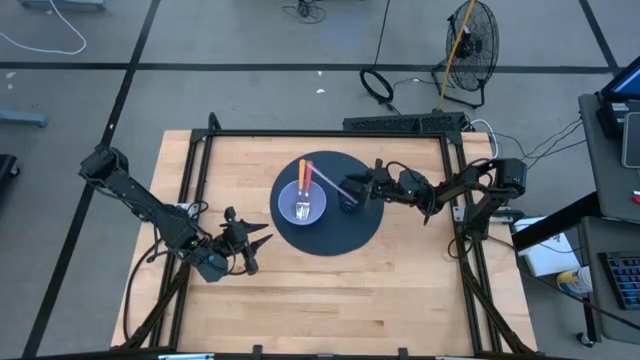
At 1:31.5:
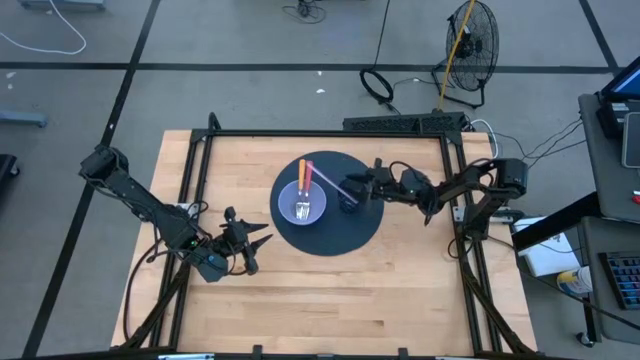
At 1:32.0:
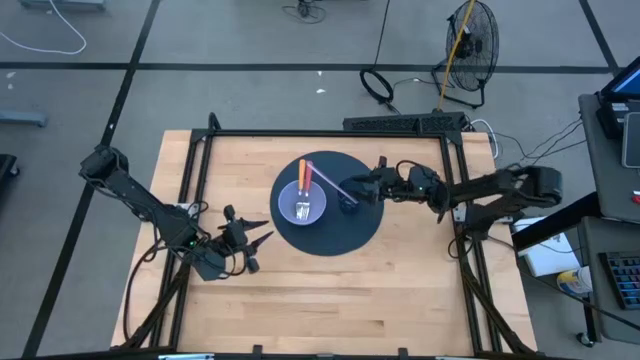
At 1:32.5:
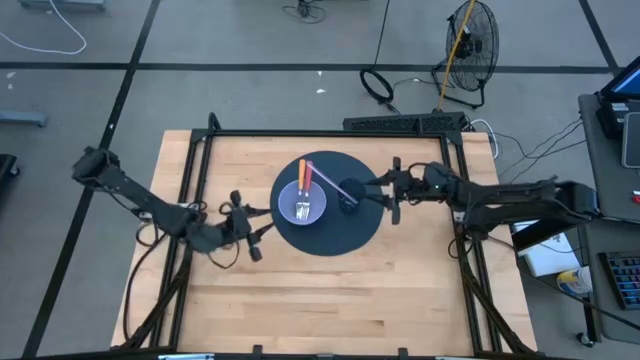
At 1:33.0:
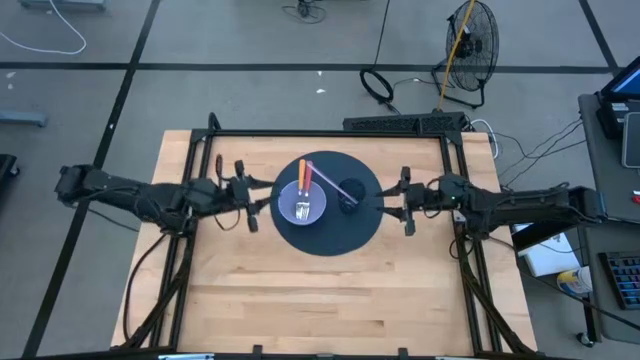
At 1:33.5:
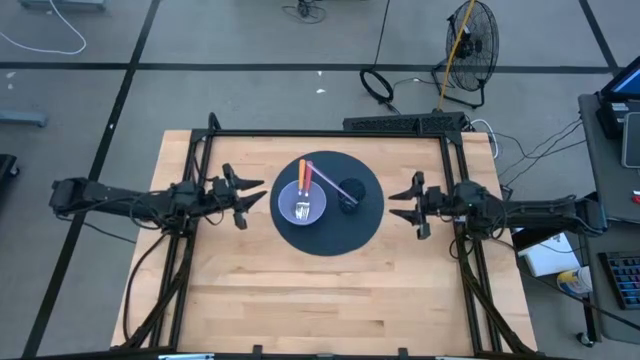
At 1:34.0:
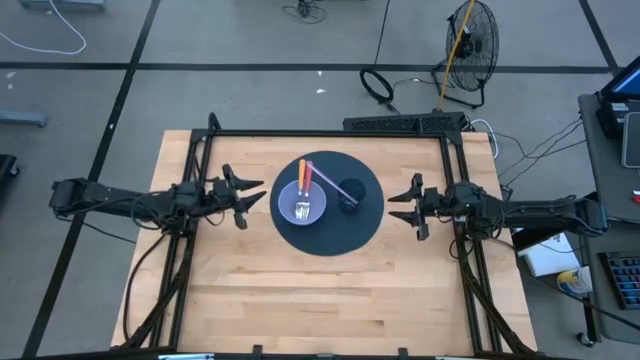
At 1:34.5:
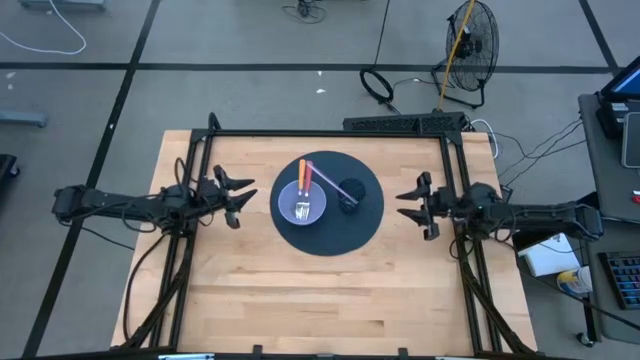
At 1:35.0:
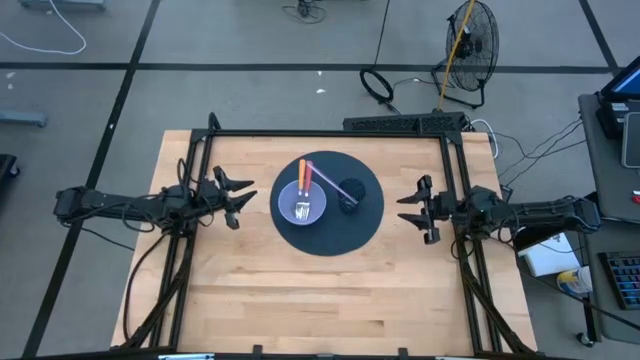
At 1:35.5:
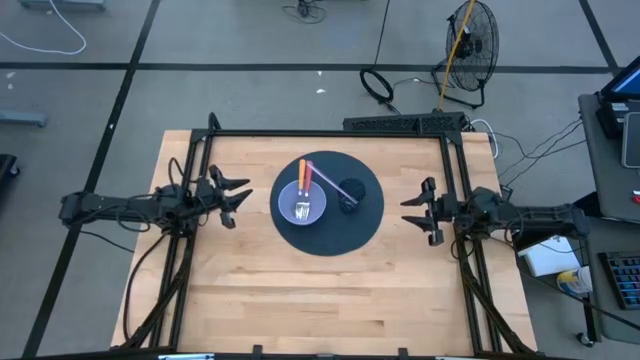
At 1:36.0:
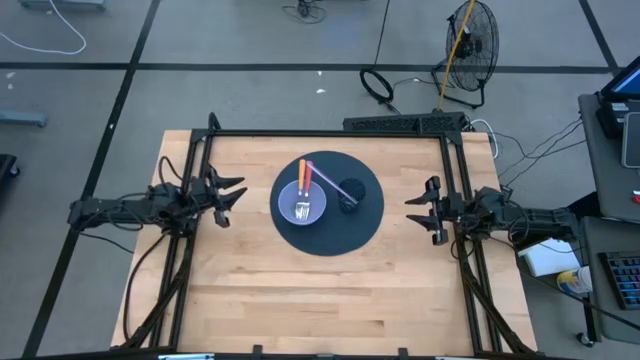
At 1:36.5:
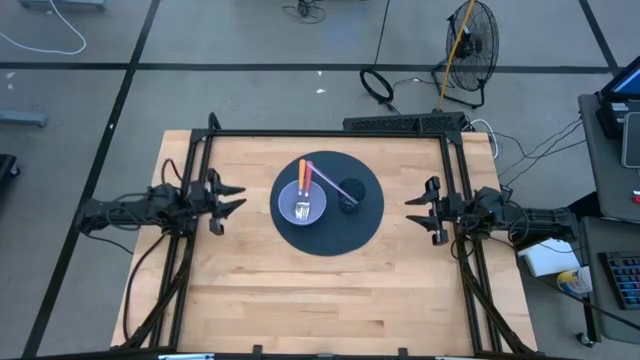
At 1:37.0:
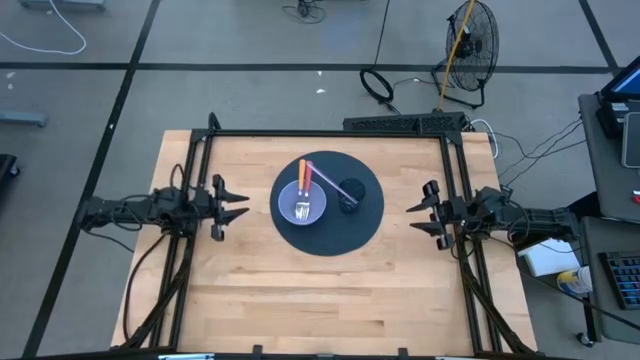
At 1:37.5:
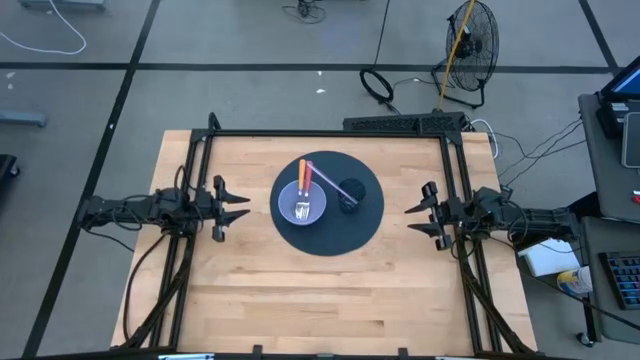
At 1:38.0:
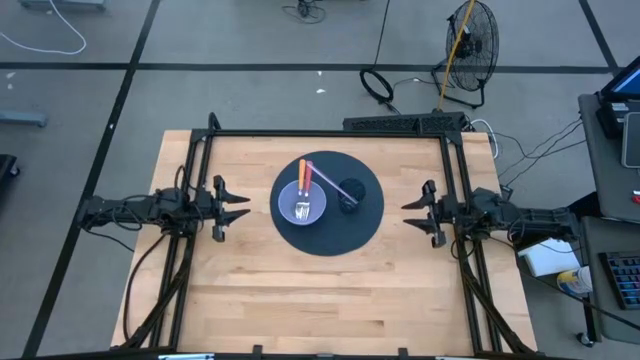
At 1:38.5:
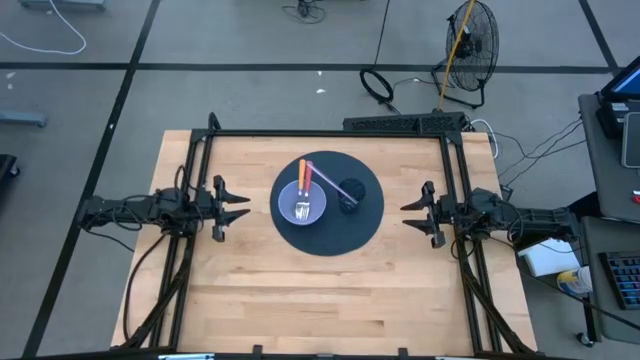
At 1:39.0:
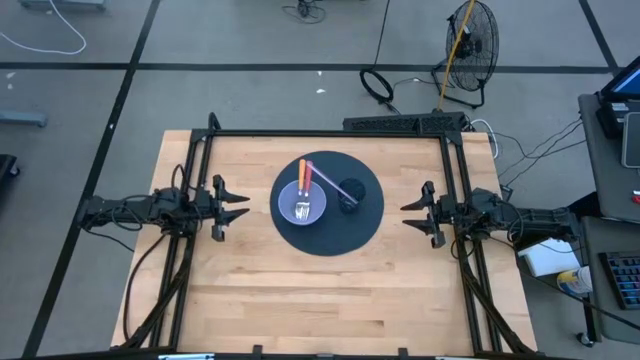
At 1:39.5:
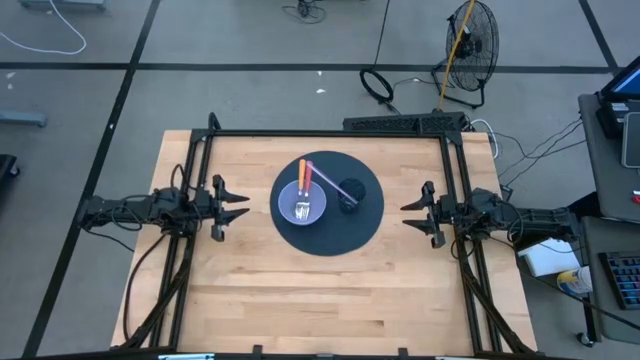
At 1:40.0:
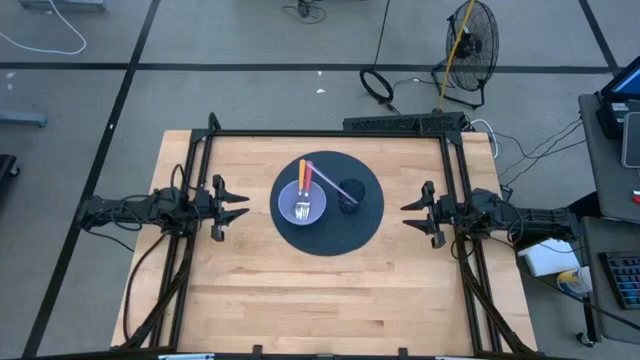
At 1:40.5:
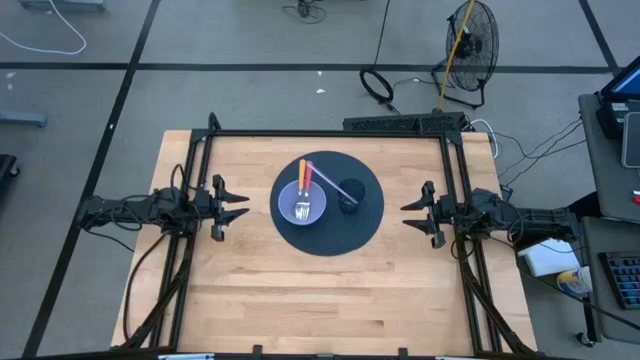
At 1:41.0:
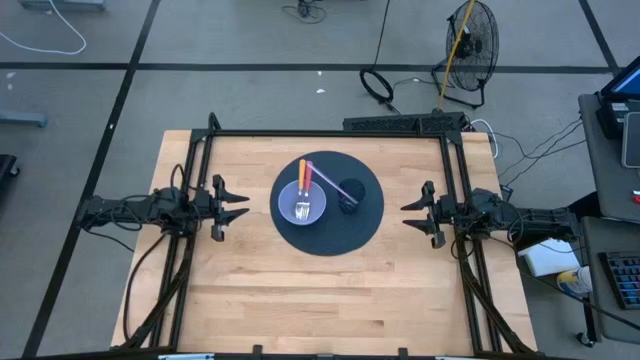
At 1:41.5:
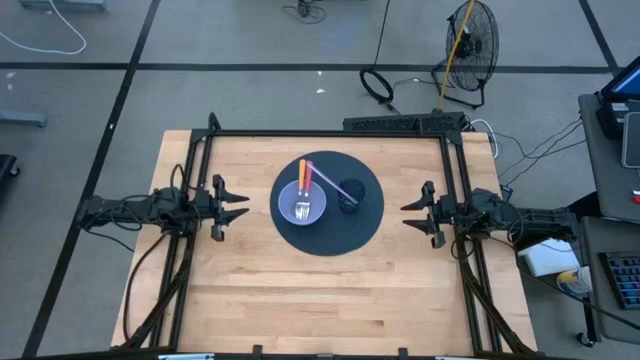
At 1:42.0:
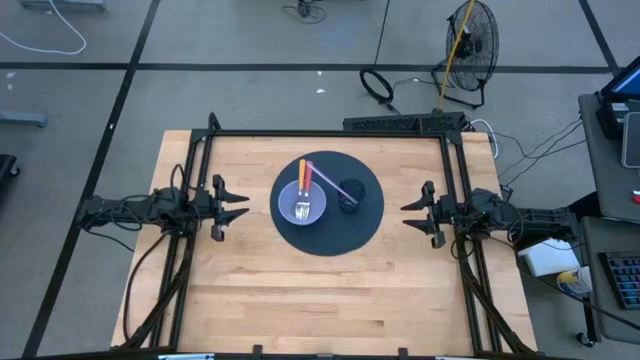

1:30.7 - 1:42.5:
Task: Pick & Place Utensil
Return to Home Position
